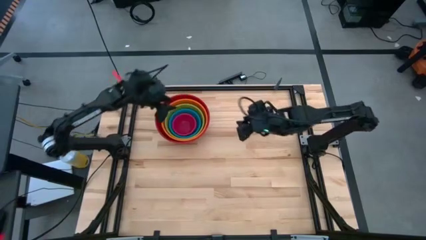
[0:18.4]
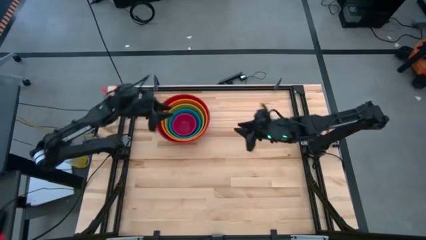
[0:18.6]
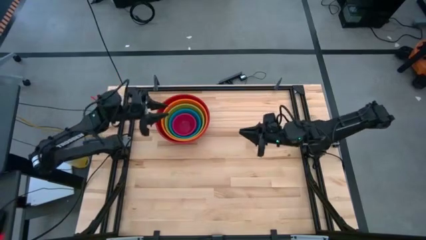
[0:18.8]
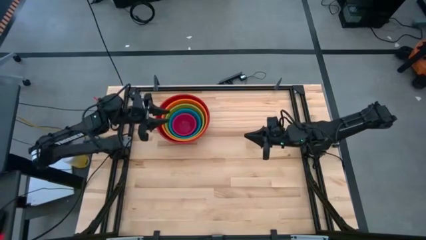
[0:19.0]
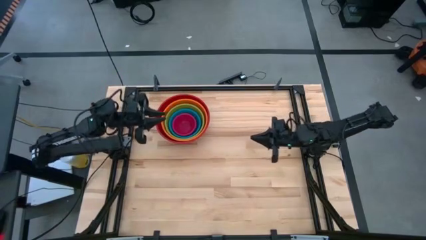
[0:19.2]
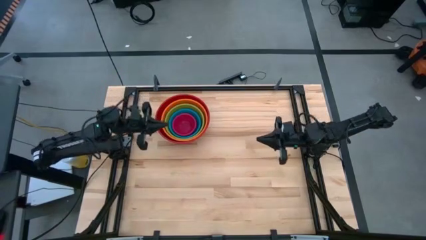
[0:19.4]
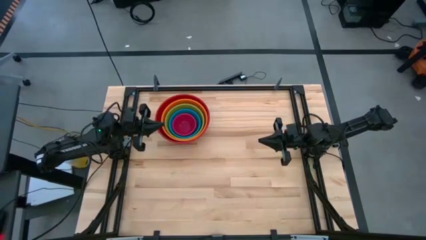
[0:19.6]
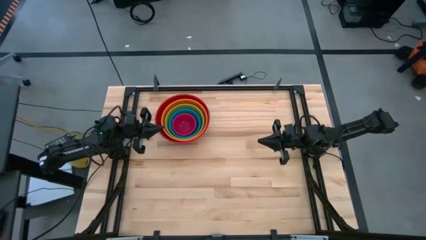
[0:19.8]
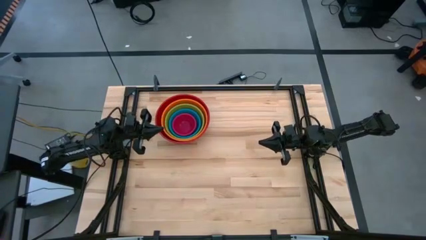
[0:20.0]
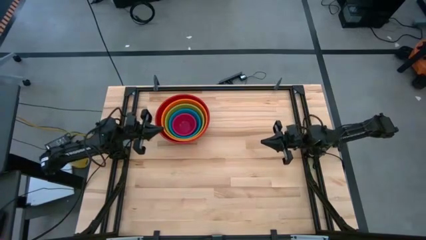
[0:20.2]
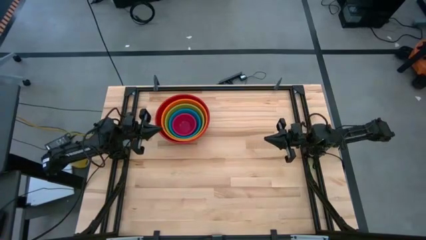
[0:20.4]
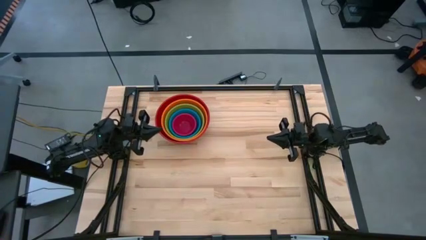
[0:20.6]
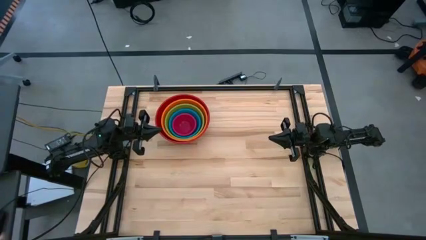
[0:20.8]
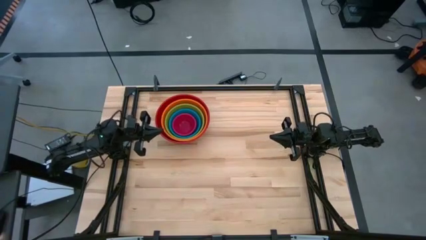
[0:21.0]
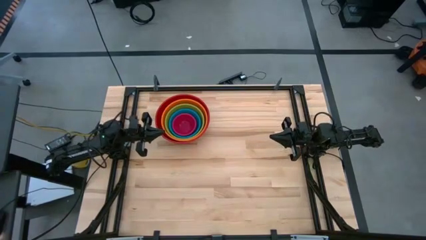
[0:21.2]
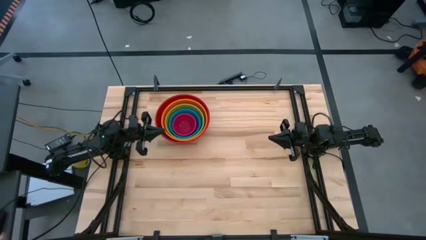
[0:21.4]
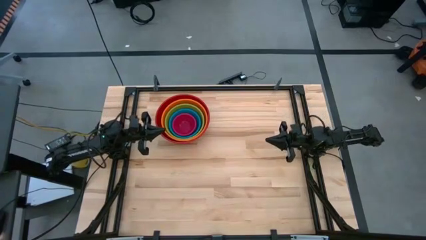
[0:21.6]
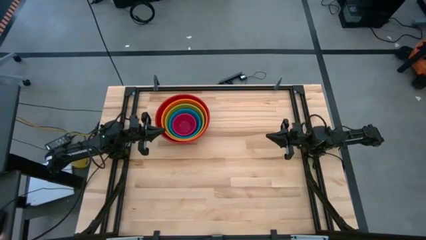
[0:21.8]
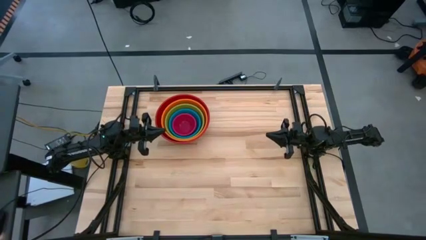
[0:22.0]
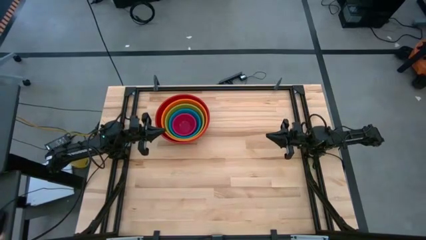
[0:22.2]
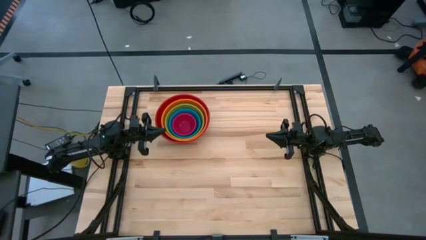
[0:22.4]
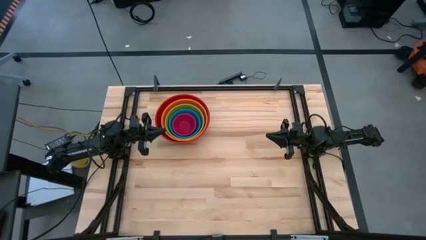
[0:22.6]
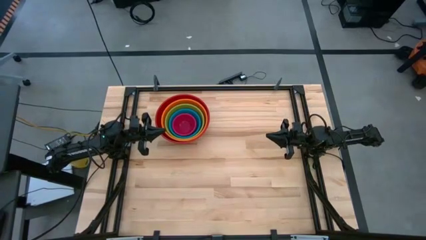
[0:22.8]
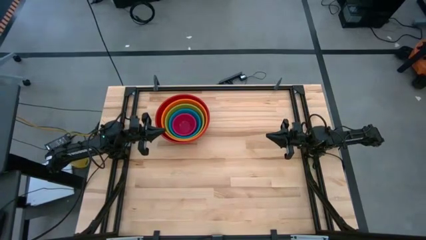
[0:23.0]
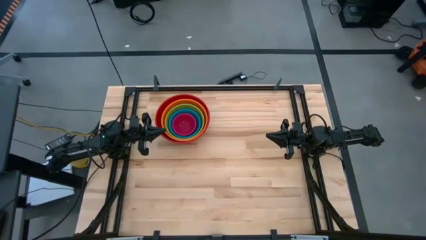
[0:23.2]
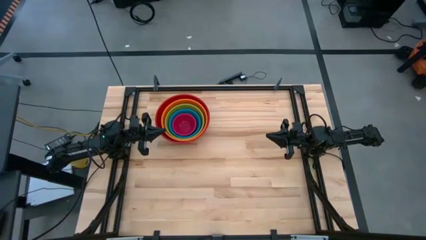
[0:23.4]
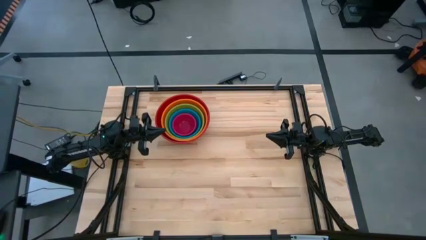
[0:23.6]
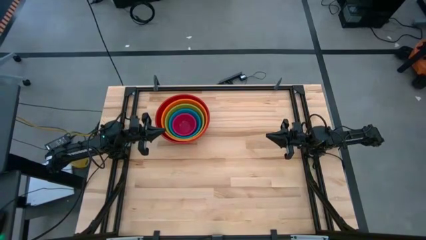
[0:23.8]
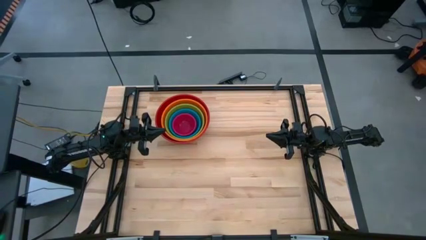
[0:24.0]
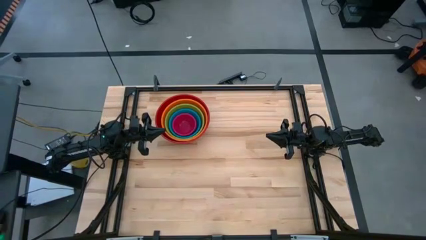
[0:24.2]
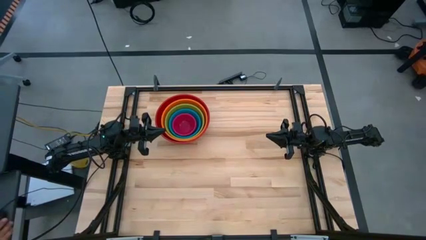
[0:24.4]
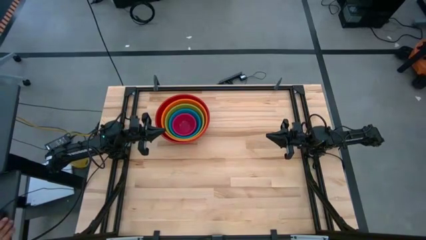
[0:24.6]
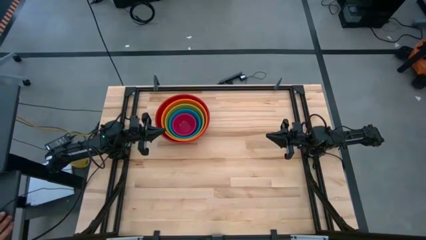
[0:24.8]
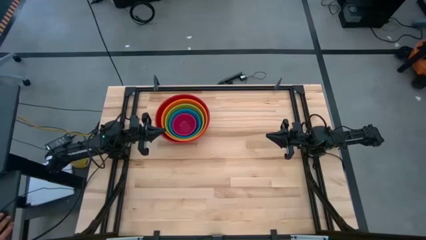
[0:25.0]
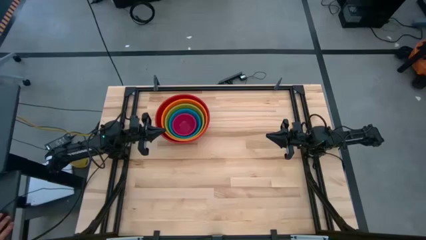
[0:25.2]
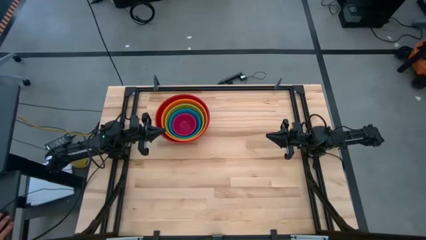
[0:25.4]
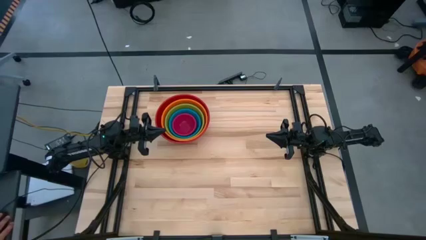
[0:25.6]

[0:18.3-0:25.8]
Return to Home Position
